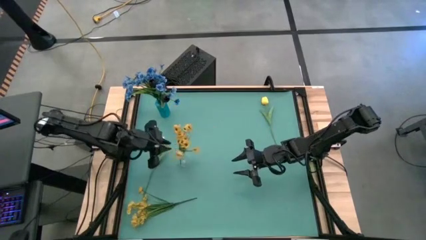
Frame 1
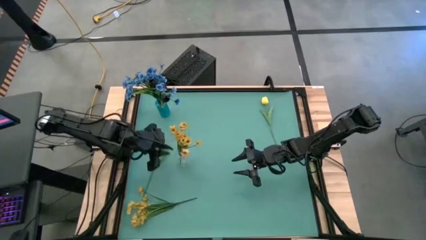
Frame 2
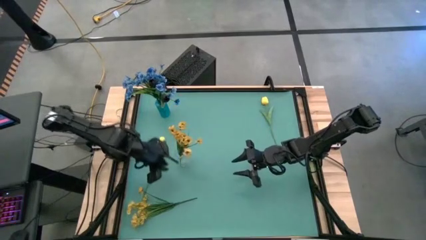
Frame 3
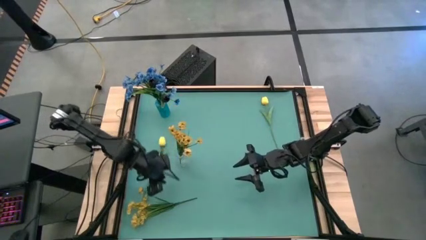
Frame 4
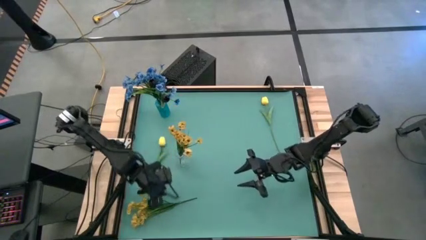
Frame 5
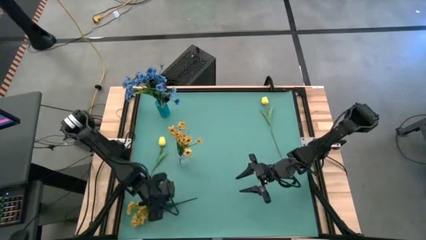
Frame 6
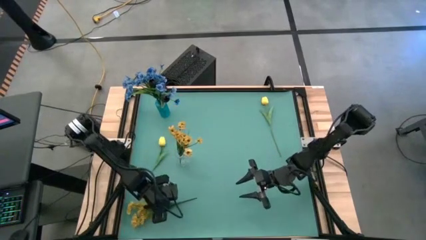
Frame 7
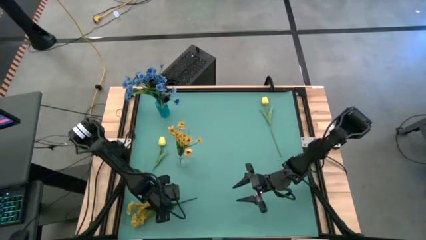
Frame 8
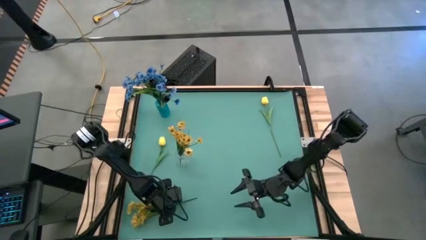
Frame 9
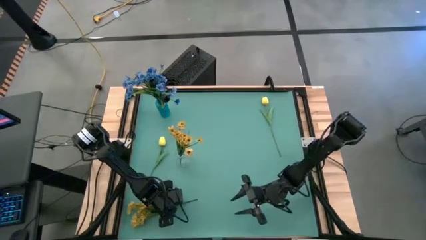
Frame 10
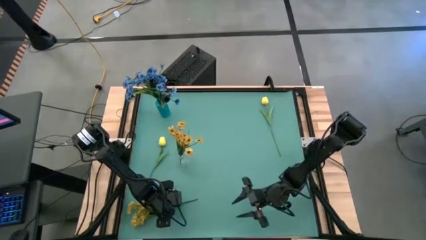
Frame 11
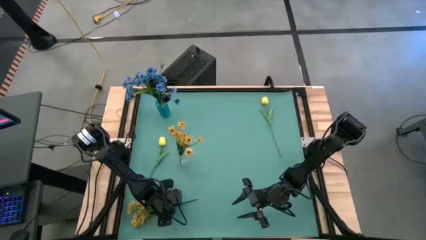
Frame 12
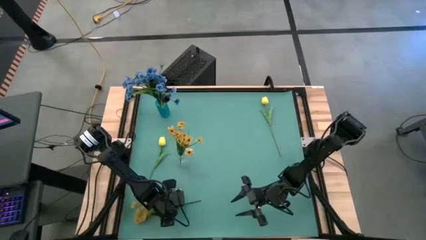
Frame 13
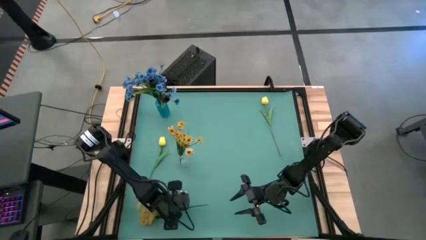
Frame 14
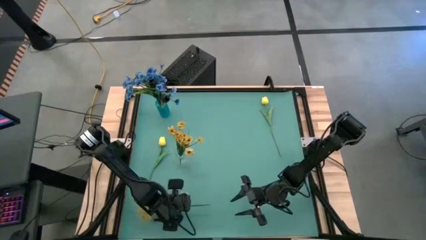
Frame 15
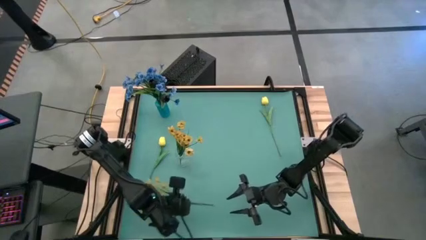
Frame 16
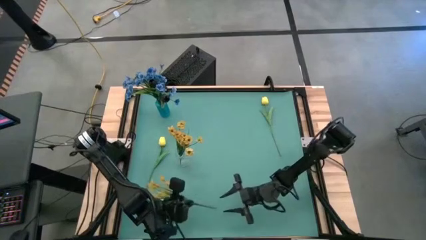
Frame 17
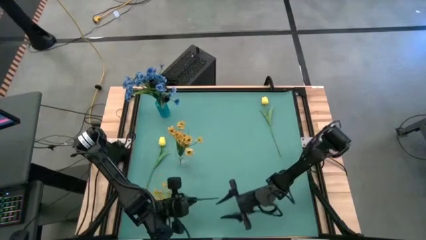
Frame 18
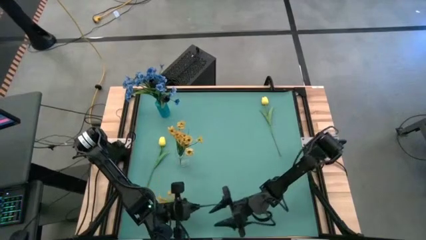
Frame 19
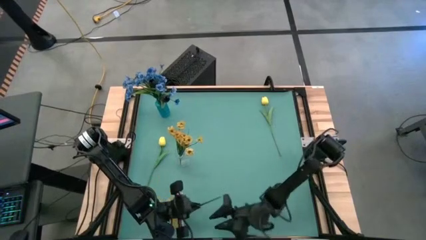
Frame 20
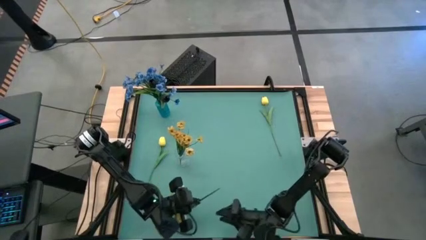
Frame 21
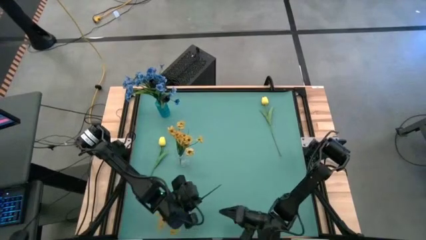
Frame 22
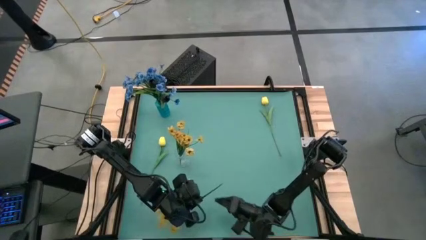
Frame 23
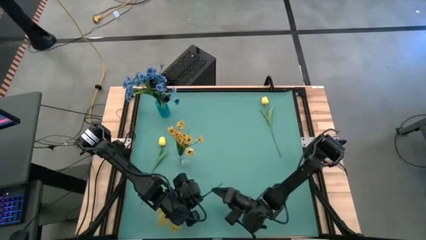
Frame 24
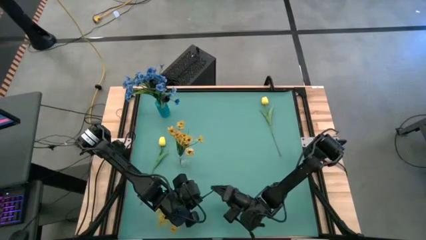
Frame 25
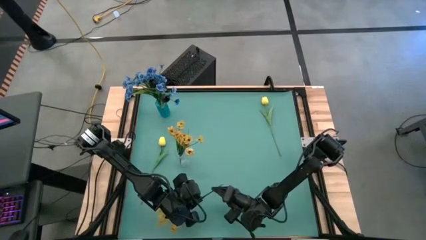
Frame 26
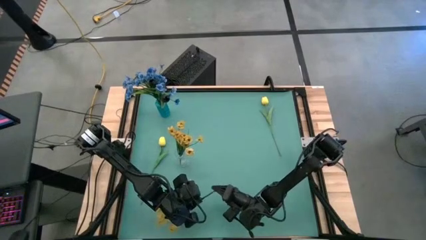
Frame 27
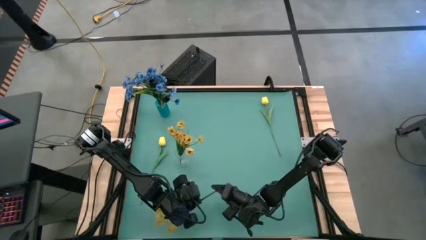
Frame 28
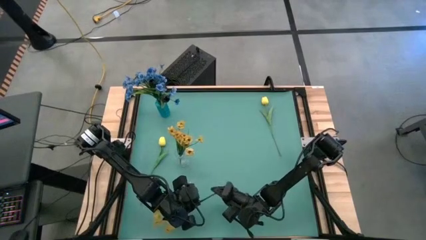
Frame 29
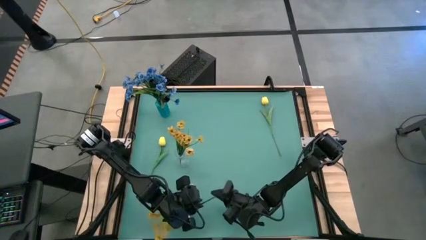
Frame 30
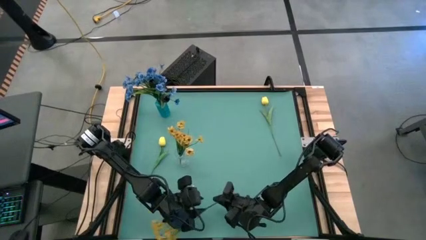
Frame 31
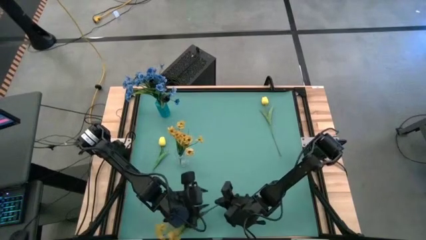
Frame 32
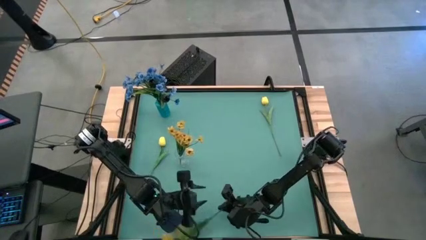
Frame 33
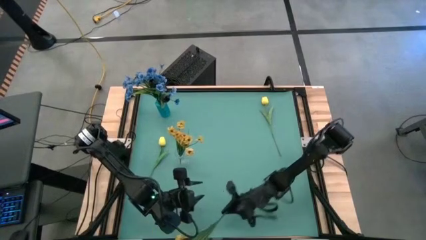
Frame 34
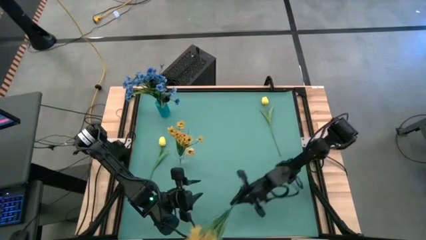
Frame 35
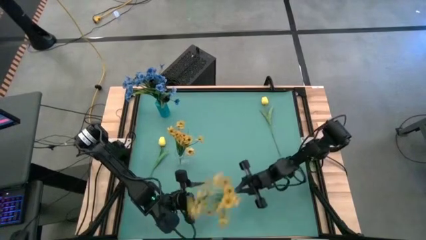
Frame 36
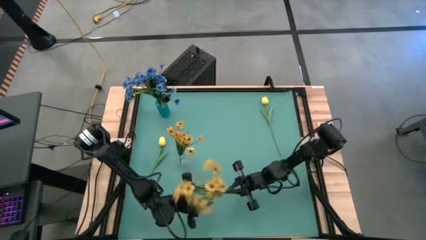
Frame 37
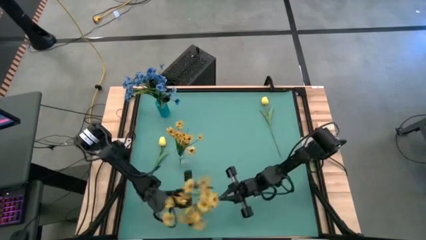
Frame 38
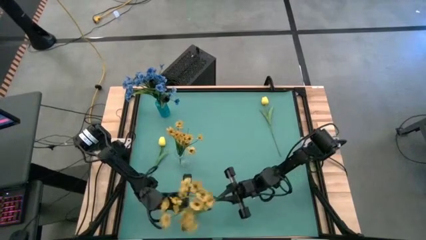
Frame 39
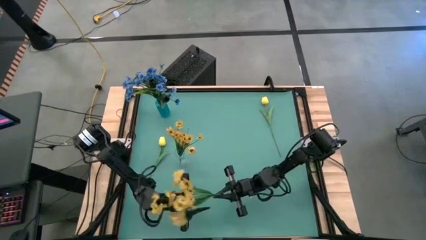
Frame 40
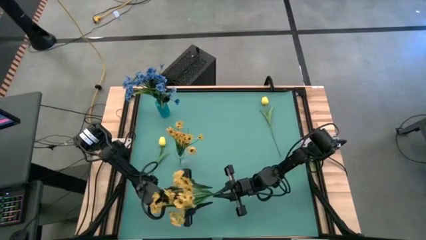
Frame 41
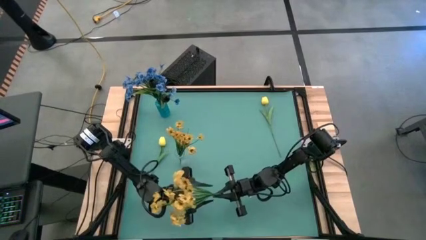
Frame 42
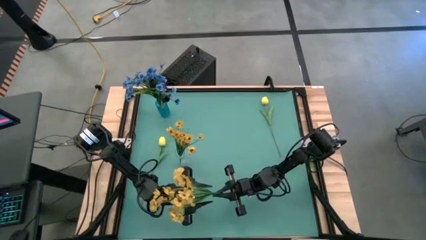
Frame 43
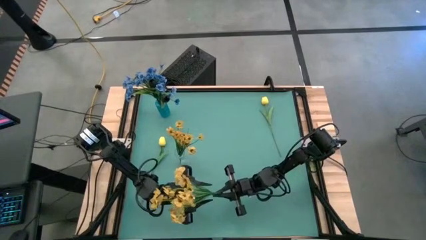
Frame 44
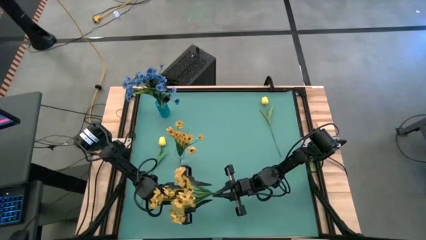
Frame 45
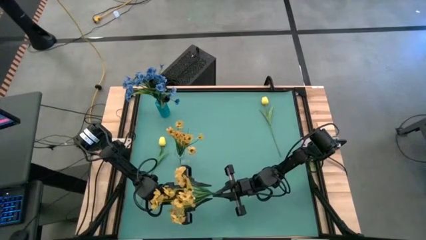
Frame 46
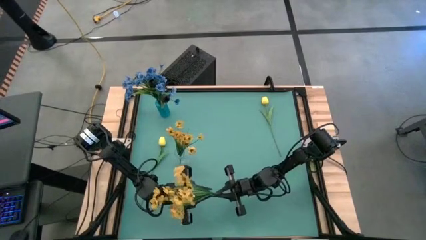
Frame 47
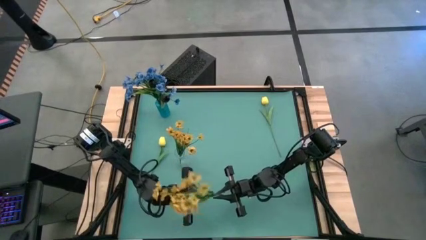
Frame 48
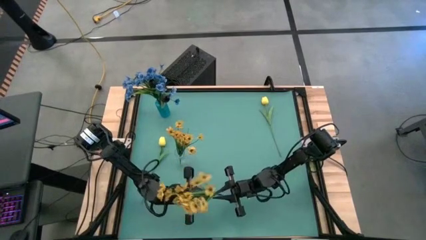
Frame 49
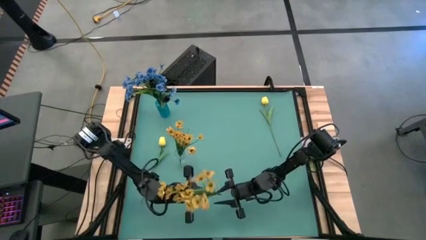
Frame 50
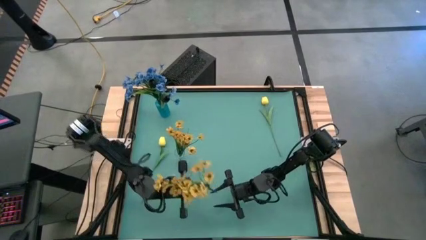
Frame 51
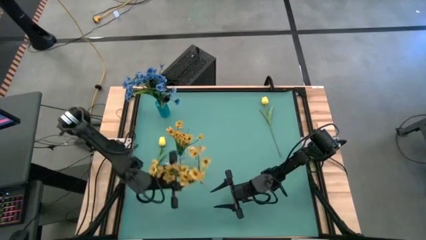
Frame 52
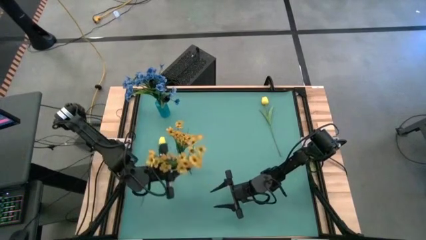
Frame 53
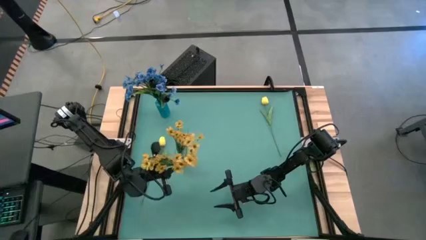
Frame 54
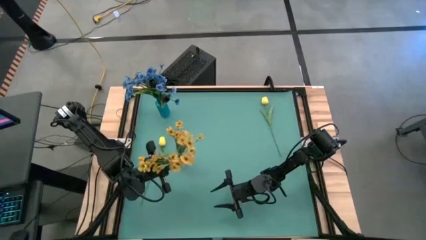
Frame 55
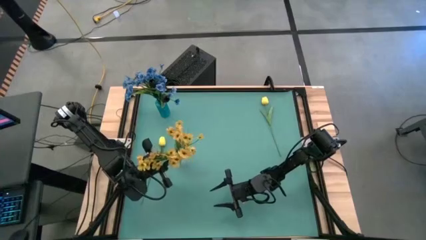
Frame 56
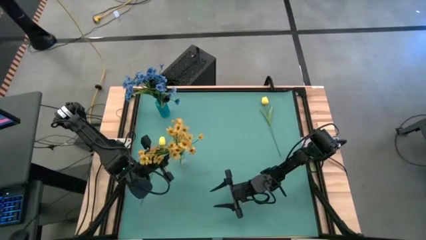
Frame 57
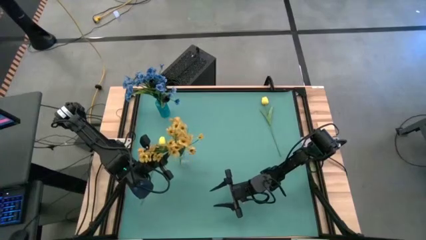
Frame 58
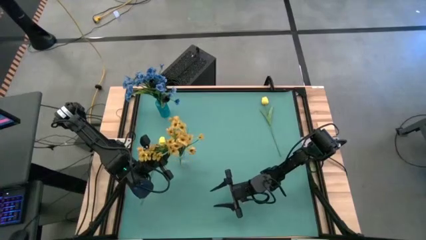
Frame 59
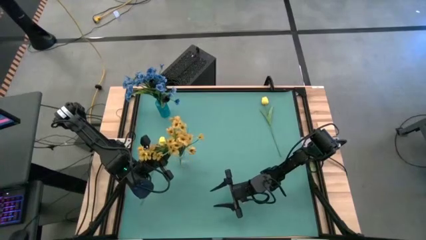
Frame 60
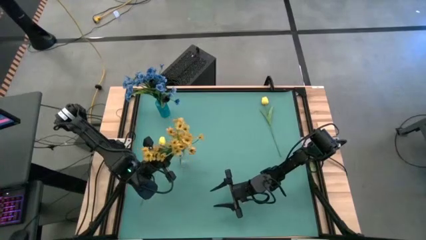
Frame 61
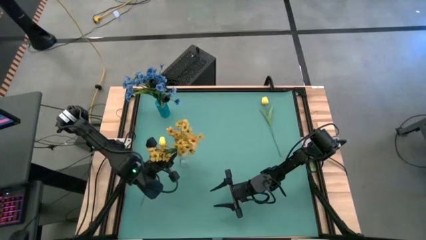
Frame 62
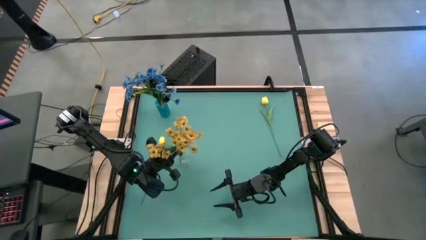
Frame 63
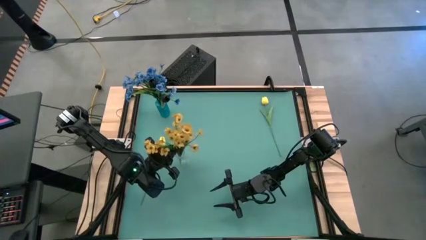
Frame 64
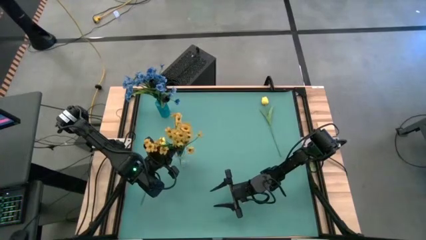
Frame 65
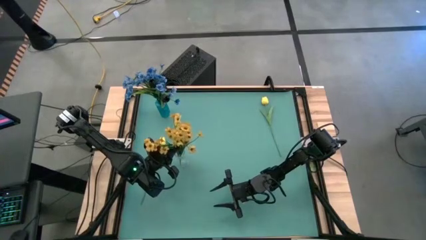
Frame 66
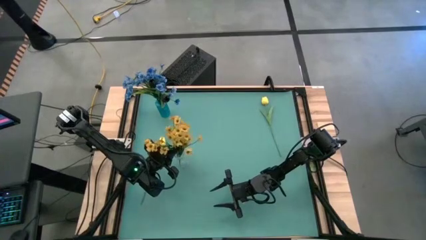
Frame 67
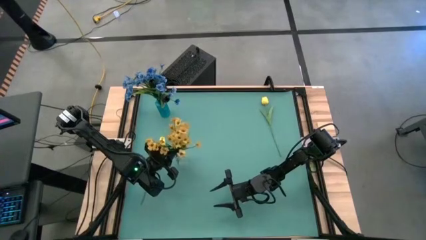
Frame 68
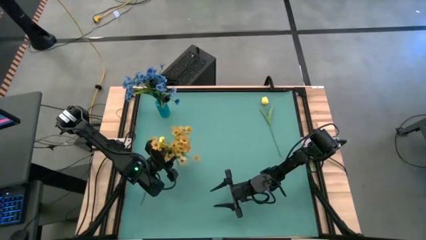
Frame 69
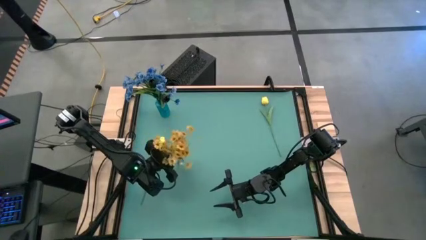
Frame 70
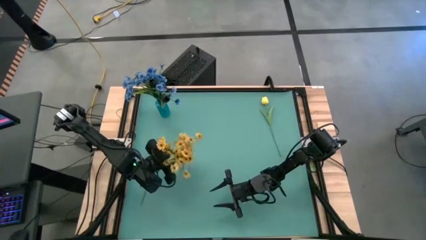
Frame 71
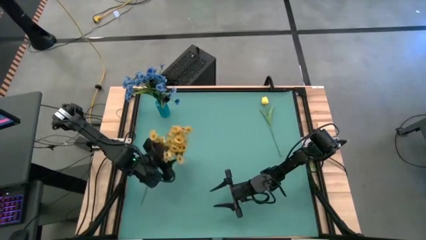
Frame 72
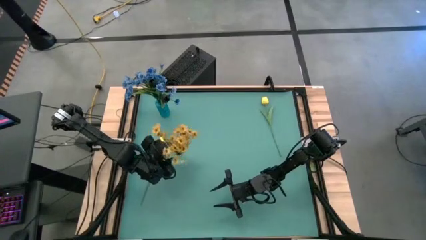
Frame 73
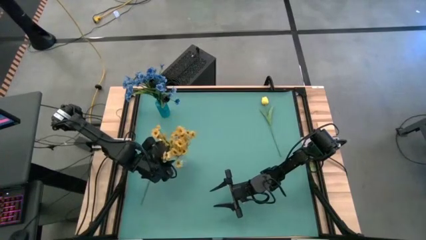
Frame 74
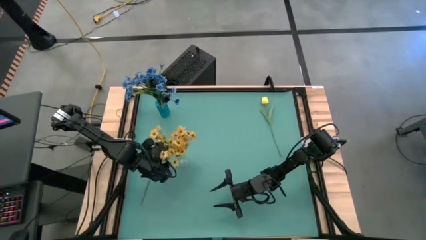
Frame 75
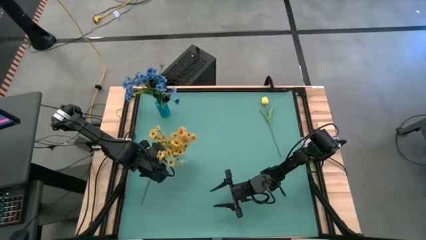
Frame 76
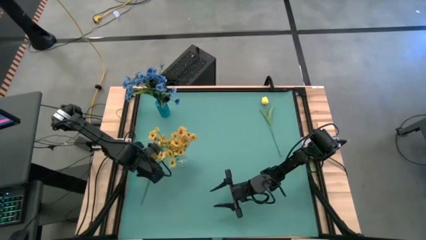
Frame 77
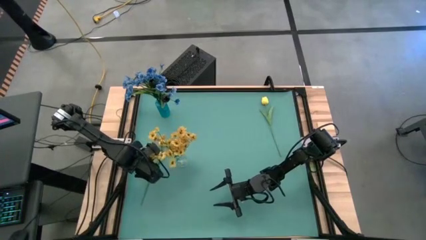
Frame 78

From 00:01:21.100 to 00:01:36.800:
Task: Sort flowers into vase by color
Put the yellow flowers into the transparent vase
